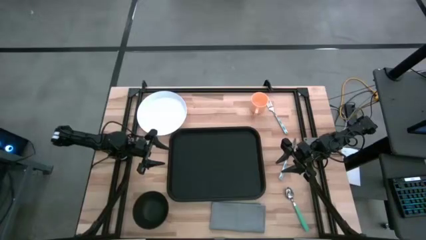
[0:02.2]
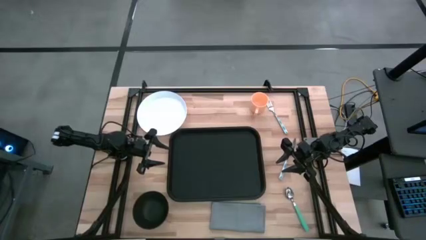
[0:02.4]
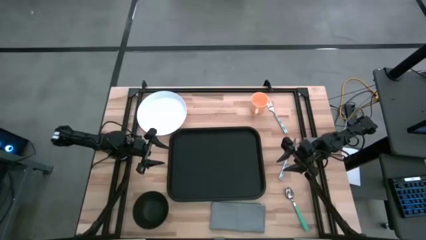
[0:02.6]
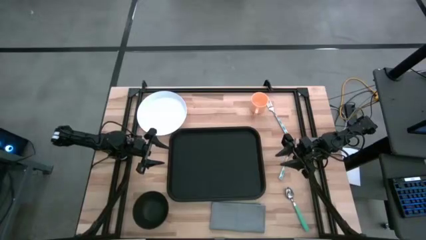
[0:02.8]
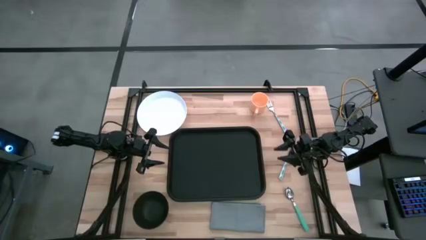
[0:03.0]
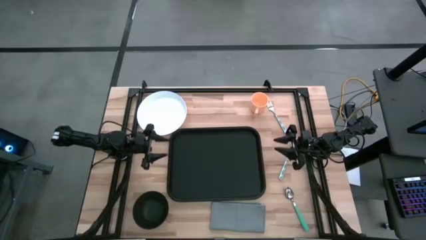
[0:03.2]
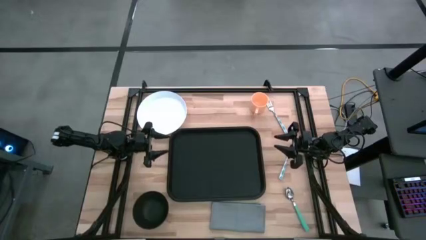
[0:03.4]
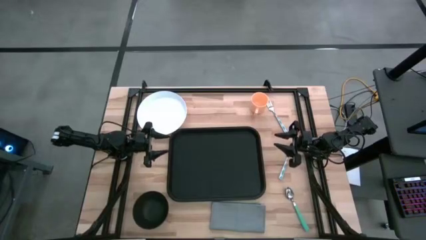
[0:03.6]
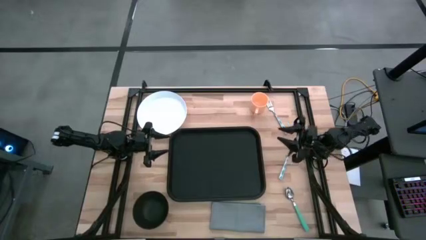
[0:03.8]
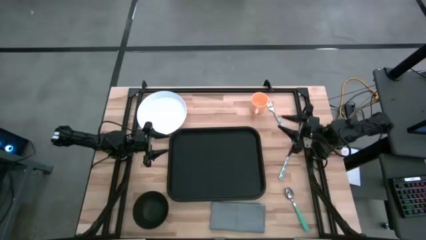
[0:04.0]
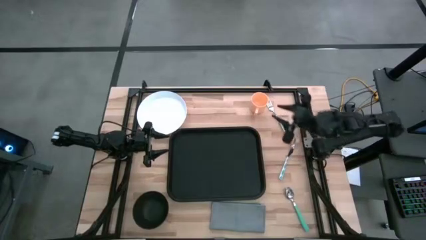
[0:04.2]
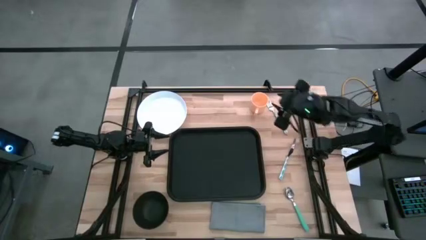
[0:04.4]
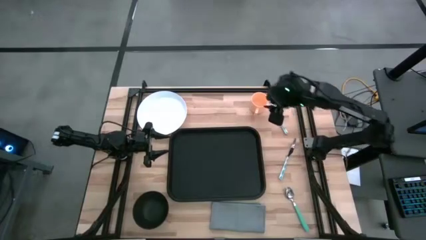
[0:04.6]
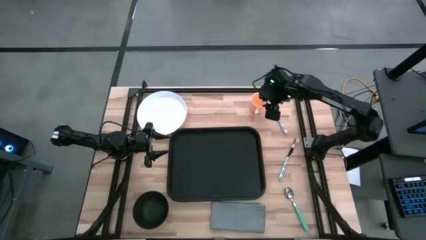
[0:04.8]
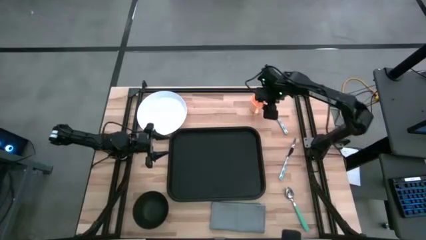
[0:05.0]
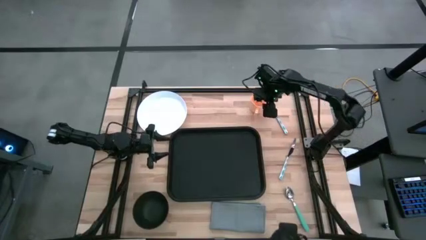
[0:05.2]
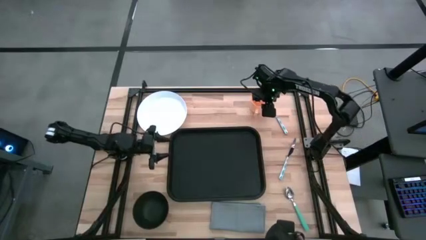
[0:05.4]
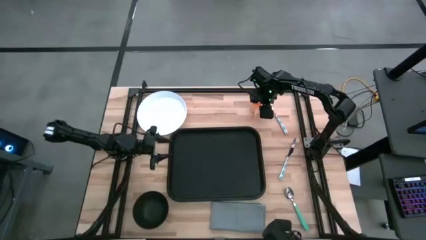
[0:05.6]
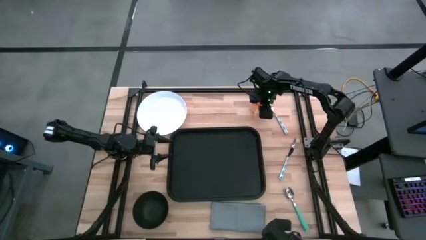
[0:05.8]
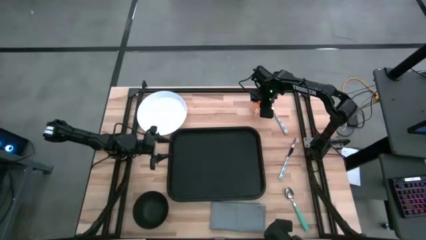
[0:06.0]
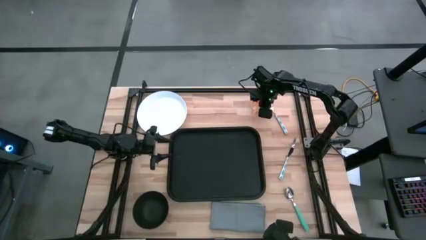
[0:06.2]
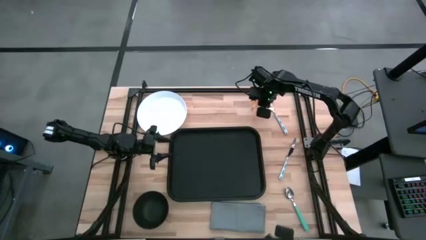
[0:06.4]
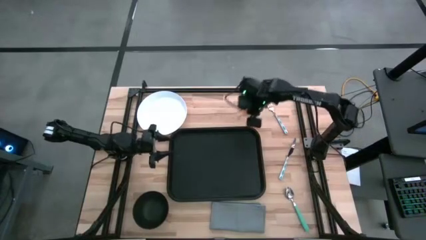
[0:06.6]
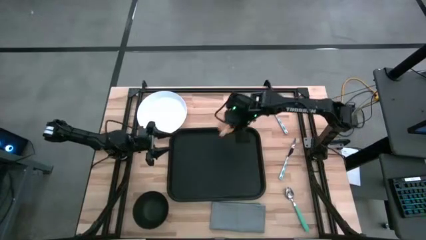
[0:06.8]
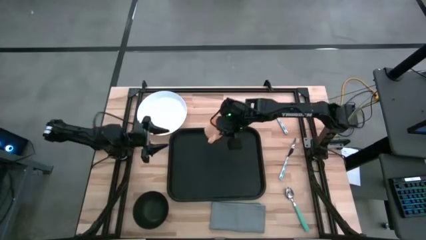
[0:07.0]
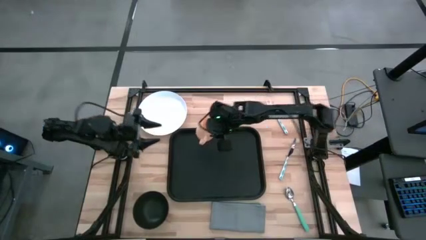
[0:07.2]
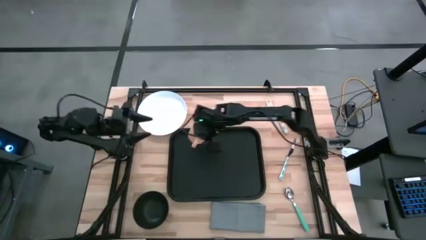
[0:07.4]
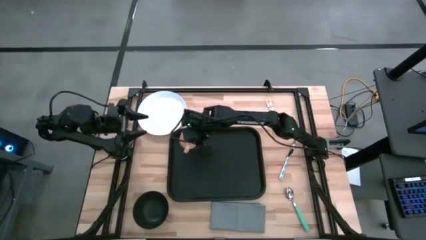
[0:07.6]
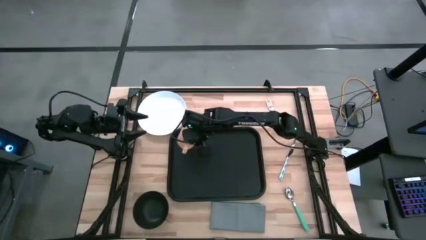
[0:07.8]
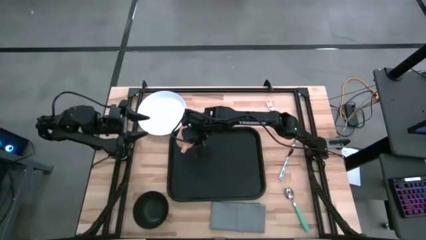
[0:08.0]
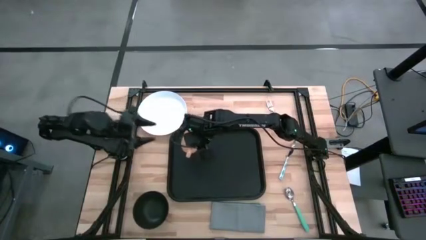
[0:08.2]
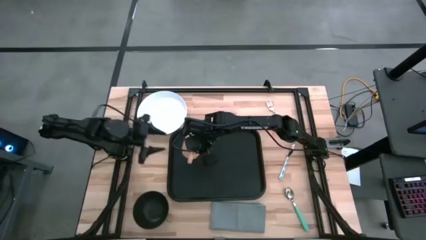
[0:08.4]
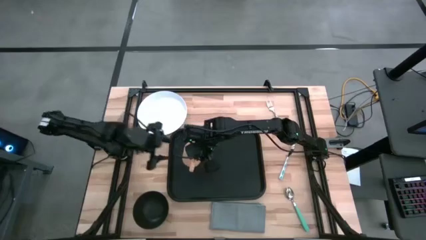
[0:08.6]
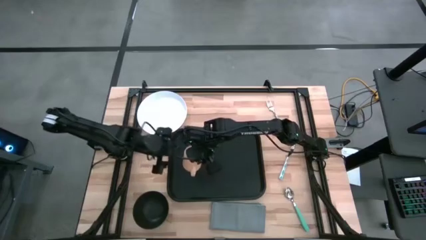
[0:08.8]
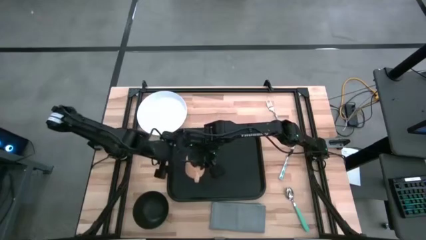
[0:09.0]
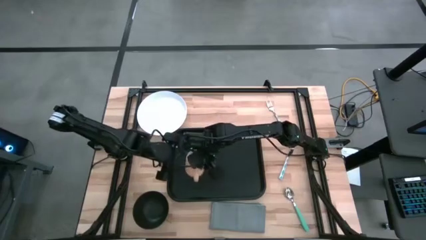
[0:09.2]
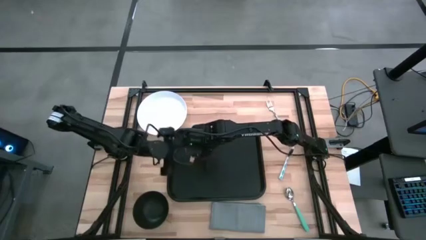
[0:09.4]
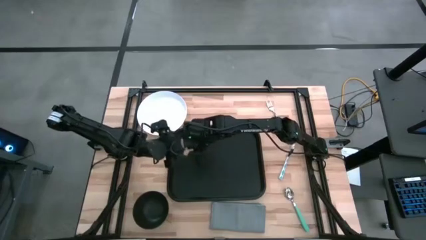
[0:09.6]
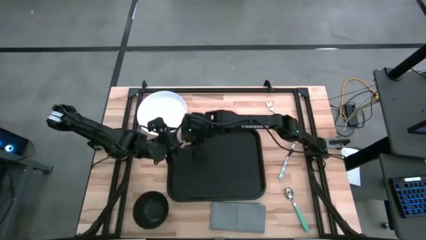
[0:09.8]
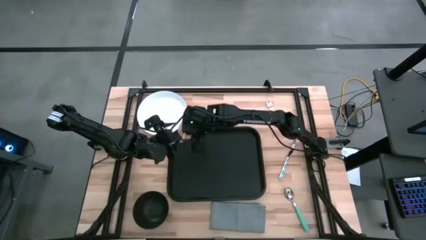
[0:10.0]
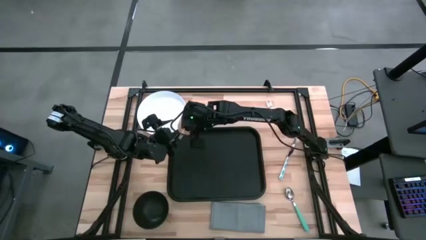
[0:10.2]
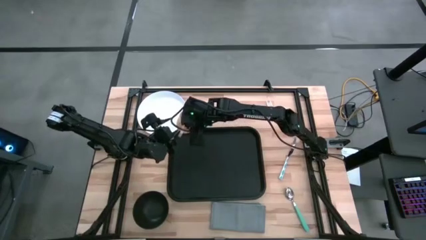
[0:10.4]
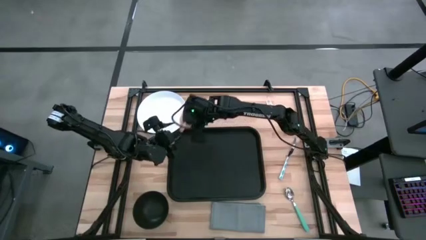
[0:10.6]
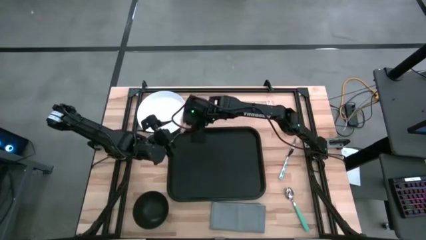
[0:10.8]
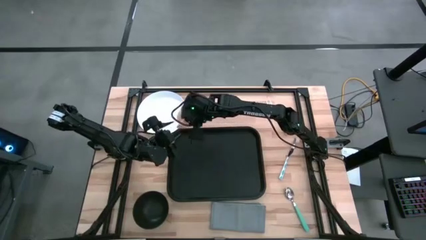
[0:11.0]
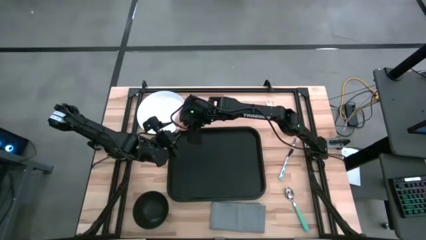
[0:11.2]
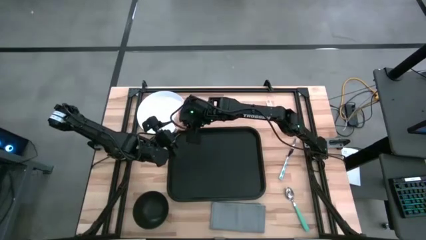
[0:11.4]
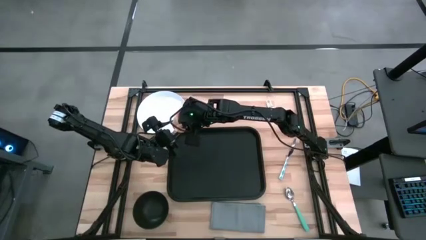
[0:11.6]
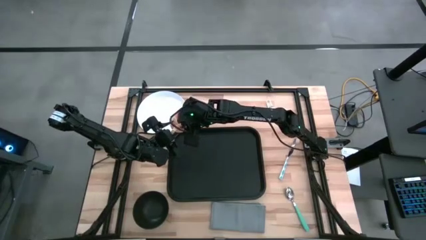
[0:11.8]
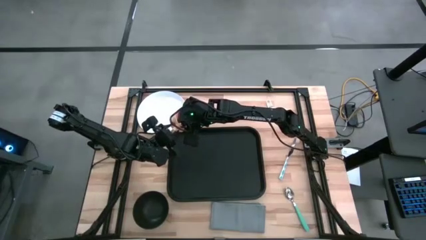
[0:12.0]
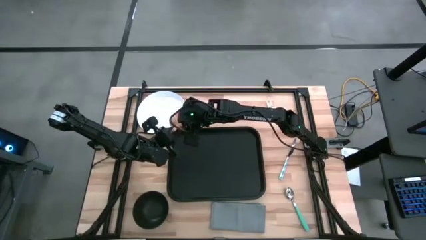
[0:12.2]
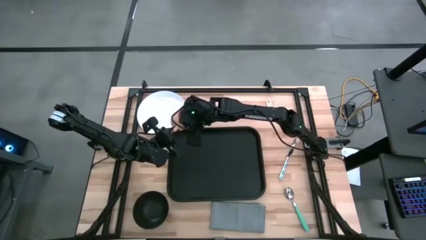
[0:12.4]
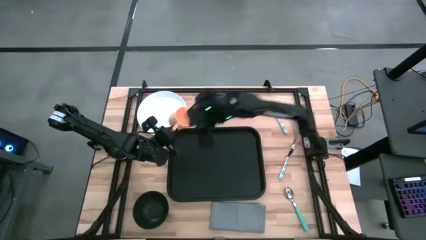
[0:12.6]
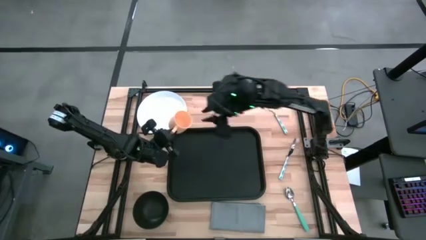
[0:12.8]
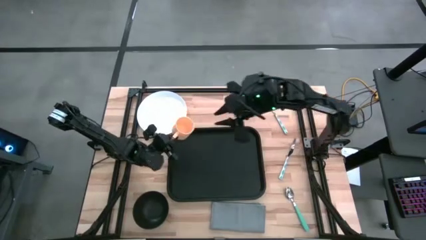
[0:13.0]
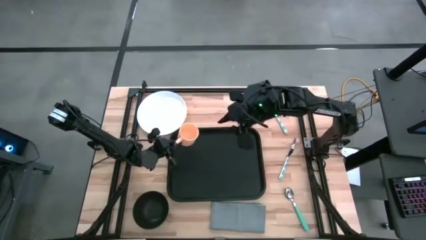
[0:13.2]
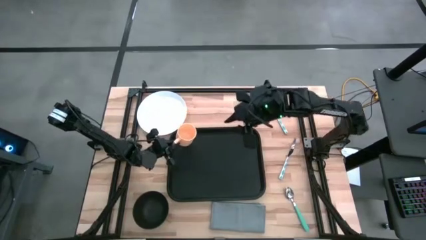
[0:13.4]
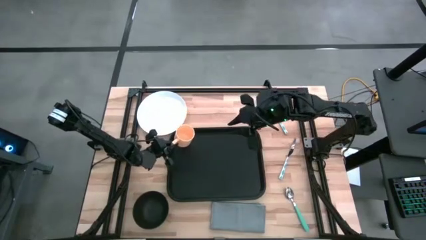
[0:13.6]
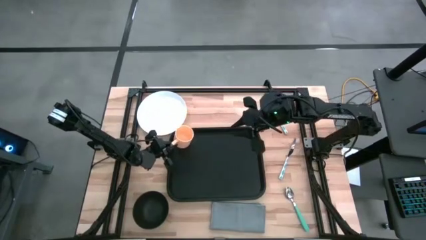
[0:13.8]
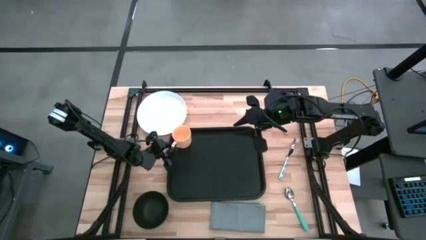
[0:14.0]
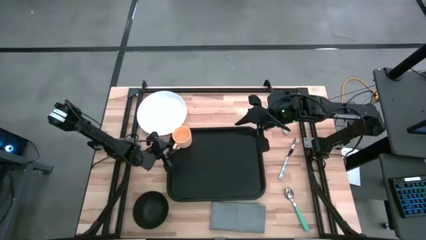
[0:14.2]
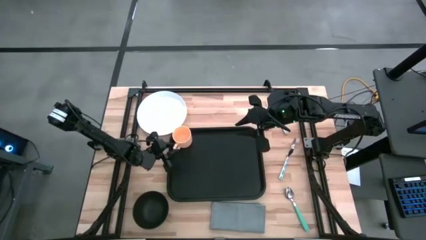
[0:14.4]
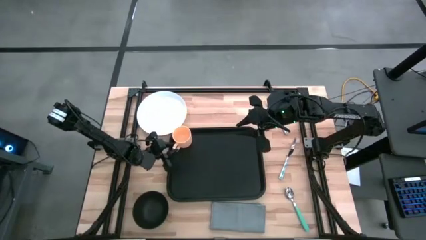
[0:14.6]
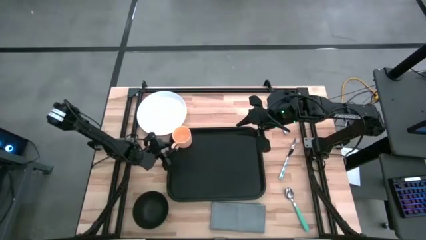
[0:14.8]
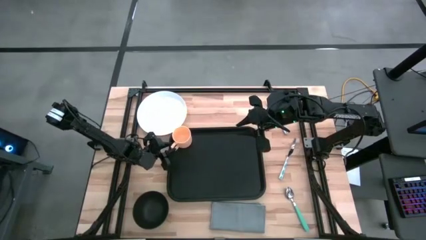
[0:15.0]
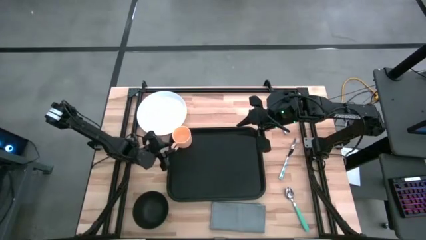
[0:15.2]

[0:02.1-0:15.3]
Task: Set up tray
Put the orange plastic mug on the serving tray
